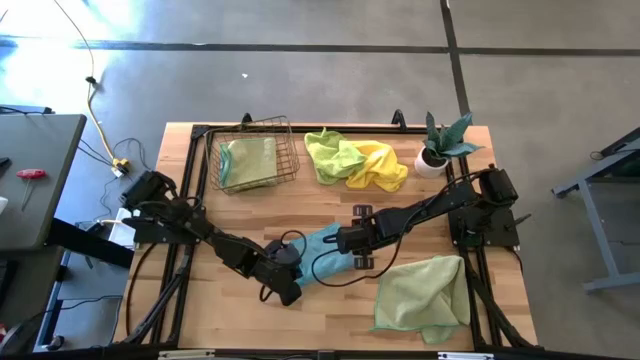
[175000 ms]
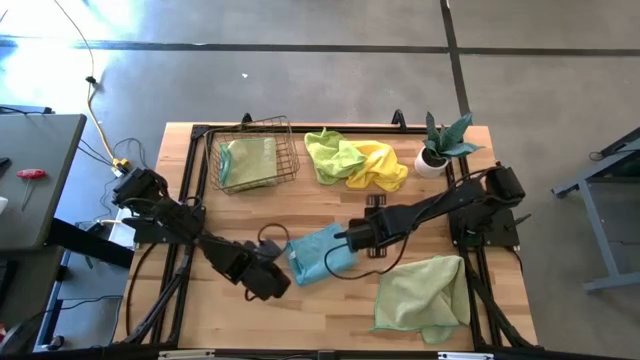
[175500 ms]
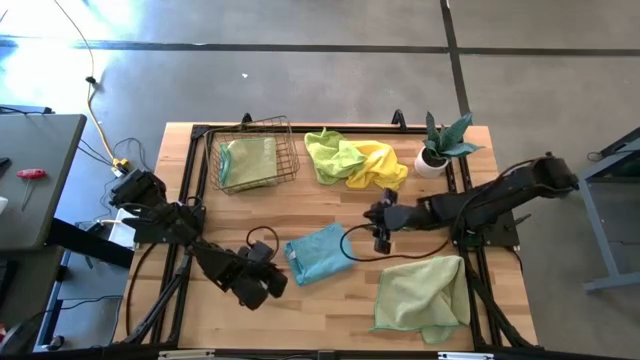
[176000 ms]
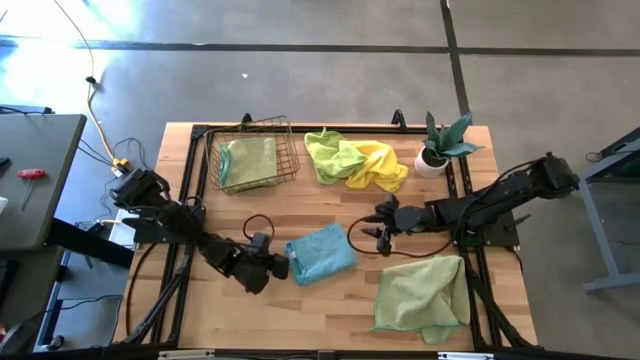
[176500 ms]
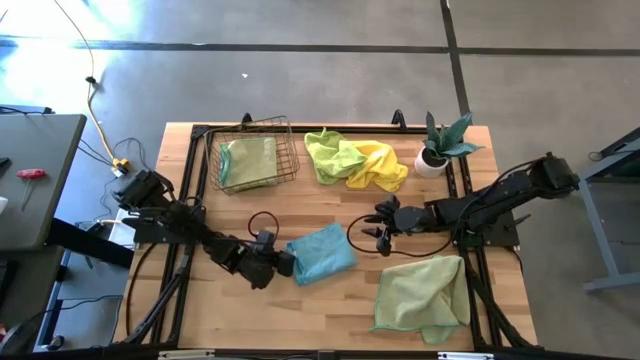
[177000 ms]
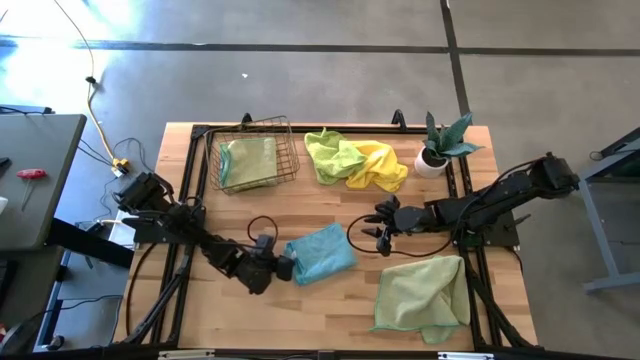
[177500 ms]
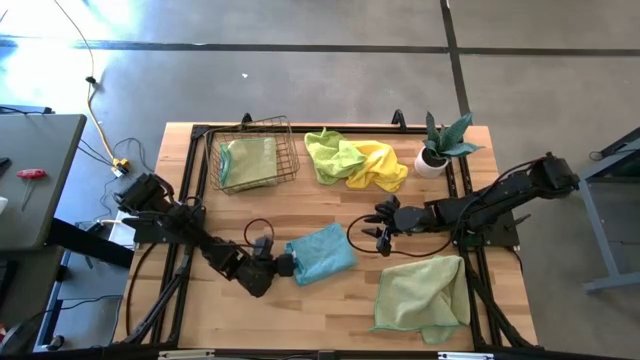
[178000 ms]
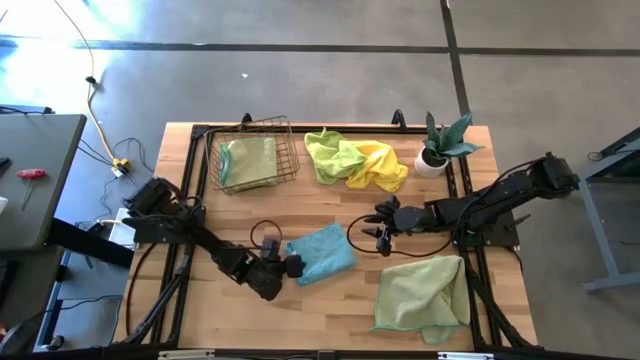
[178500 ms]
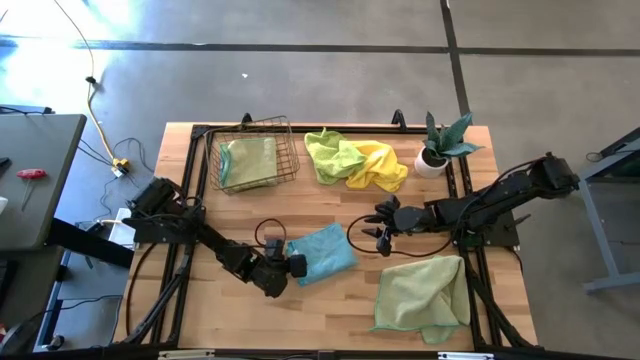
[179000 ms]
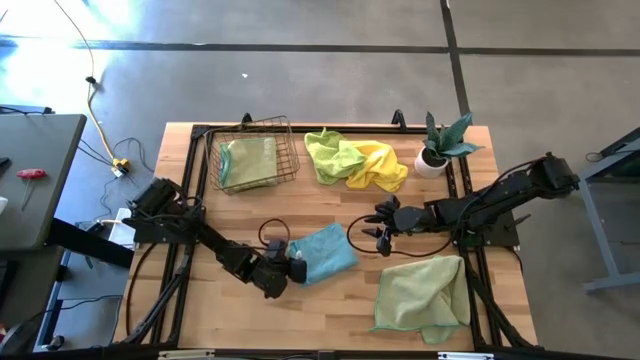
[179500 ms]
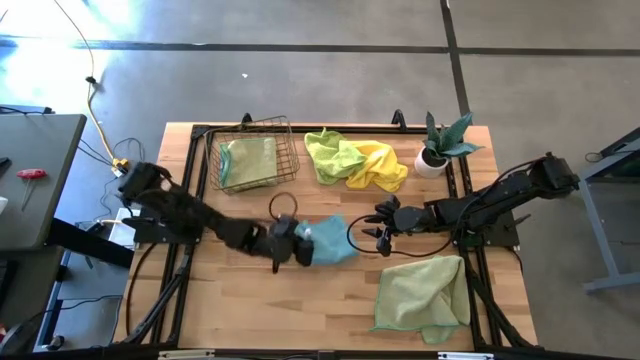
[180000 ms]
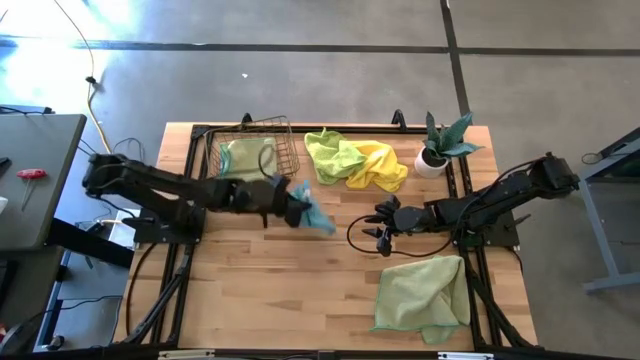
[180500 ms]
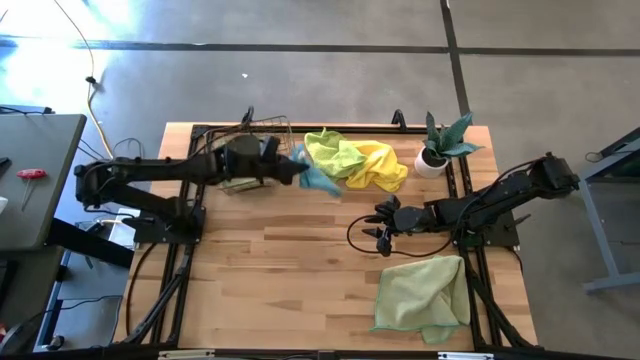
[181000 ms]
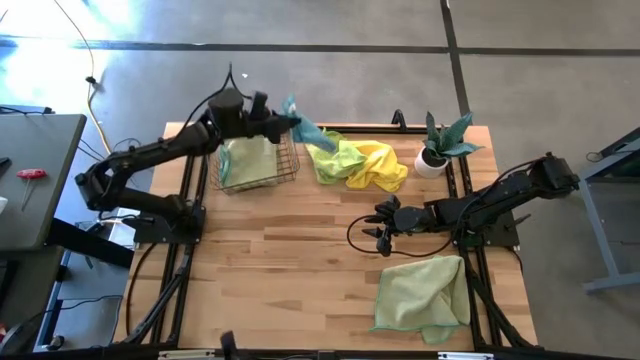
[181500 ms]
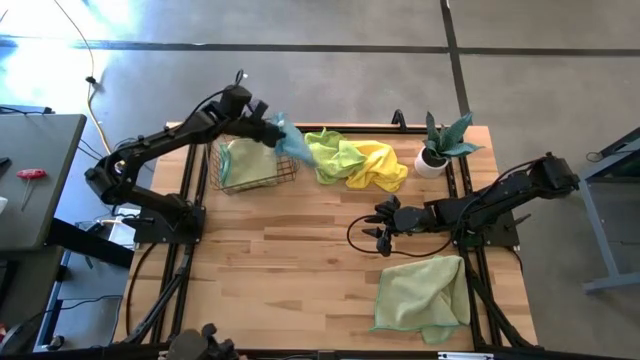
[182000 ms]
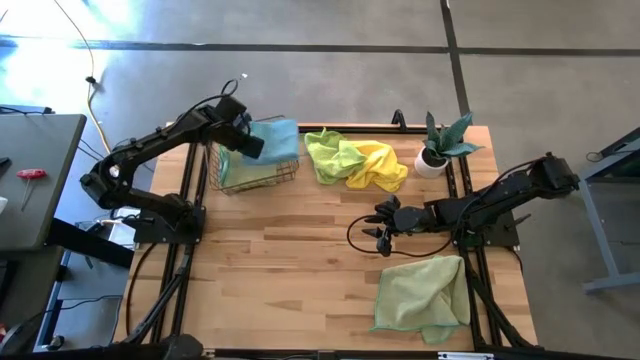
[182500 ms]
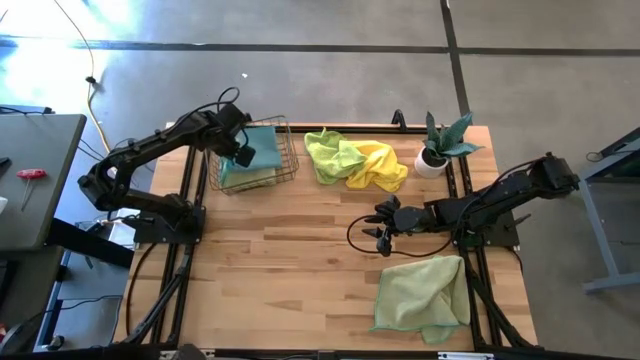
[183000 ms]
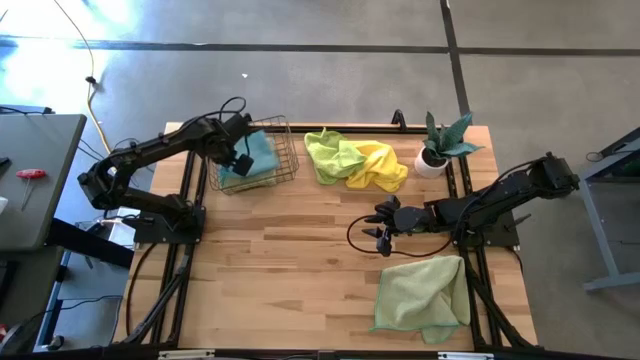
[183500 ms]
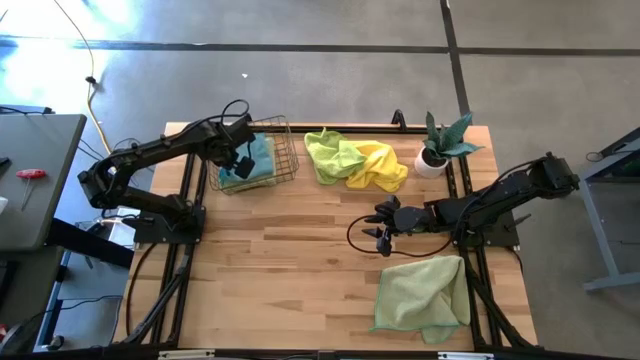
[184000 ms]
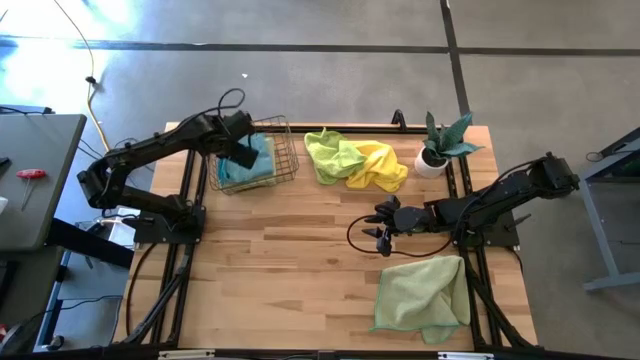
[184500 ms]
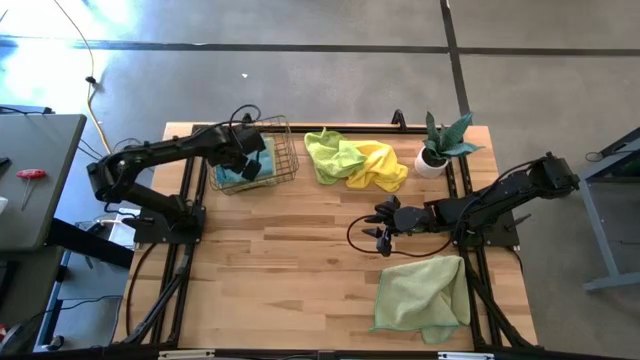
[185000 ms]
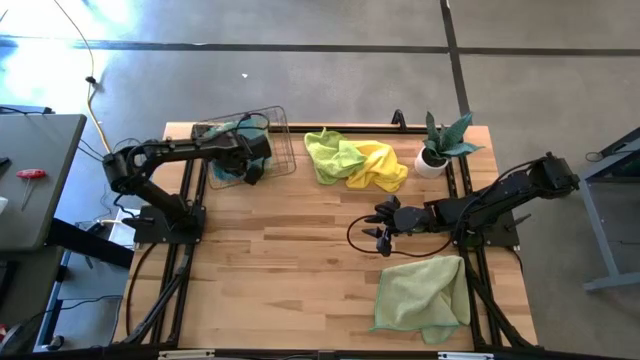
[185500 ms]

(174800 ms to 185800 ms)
Task: Fold microfiber towels
Put the folded blue towel into the wire basket

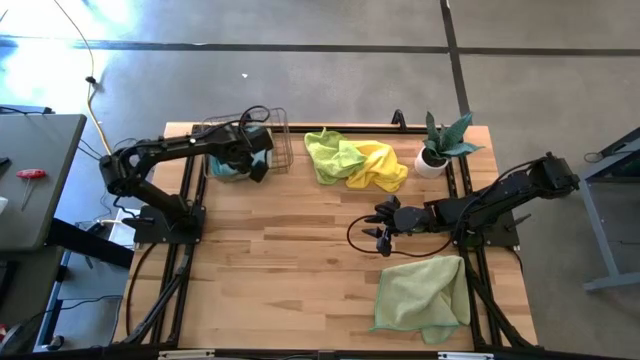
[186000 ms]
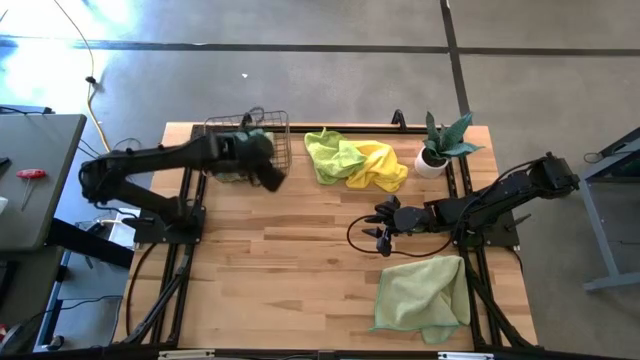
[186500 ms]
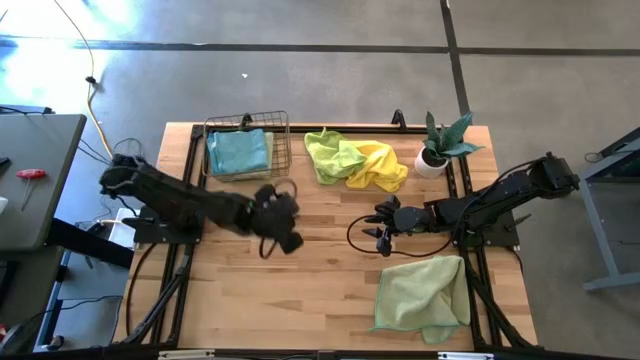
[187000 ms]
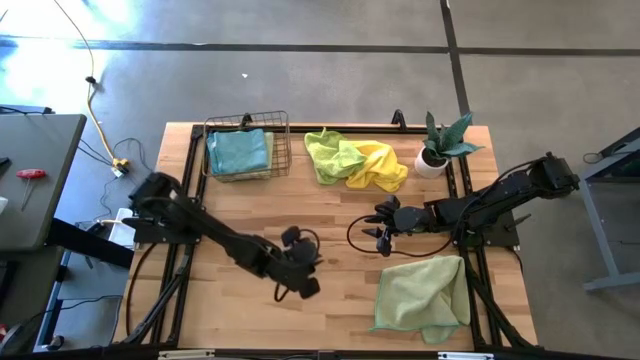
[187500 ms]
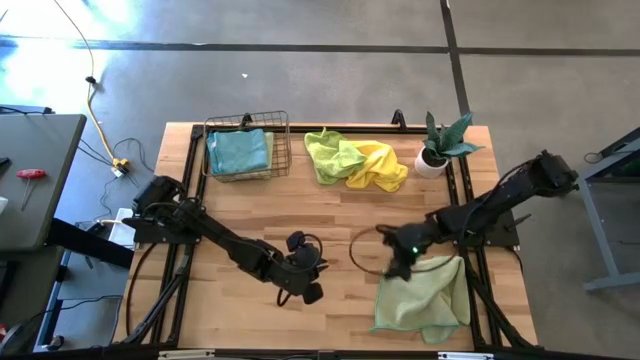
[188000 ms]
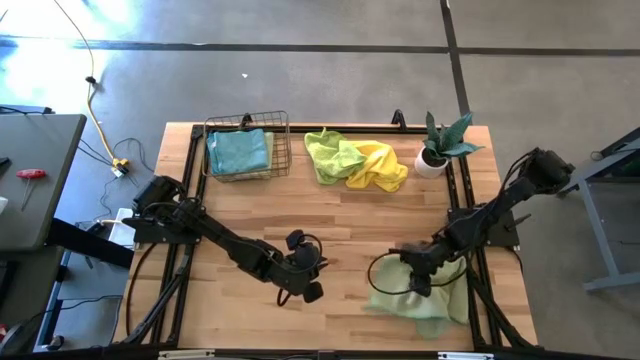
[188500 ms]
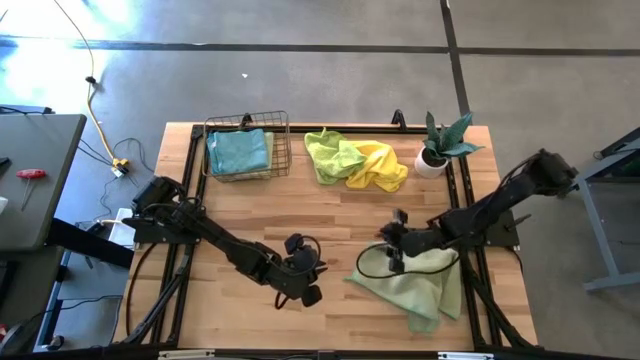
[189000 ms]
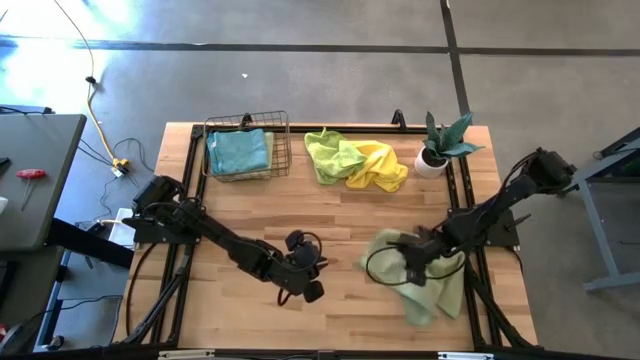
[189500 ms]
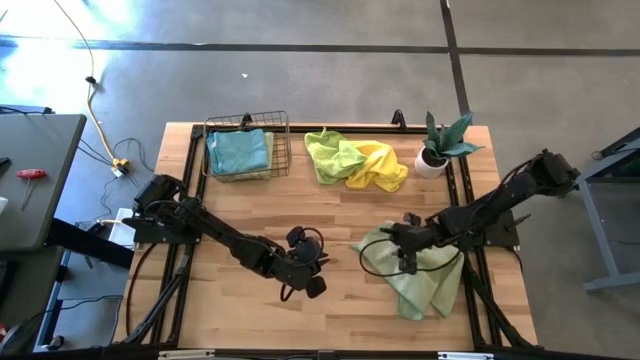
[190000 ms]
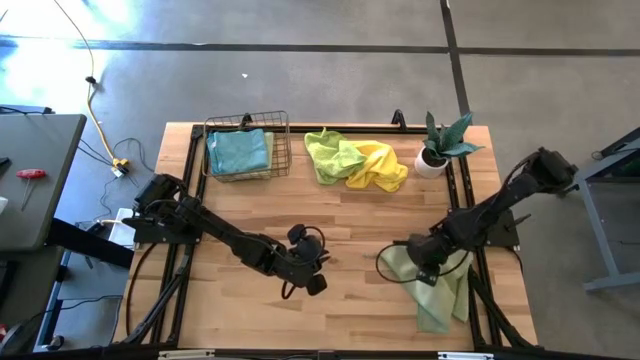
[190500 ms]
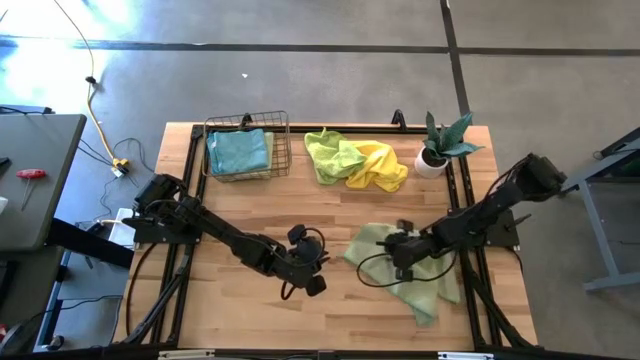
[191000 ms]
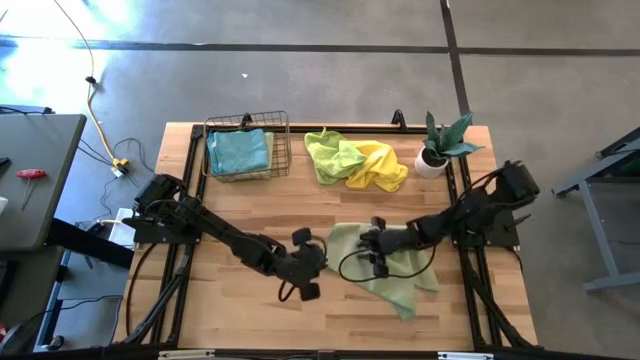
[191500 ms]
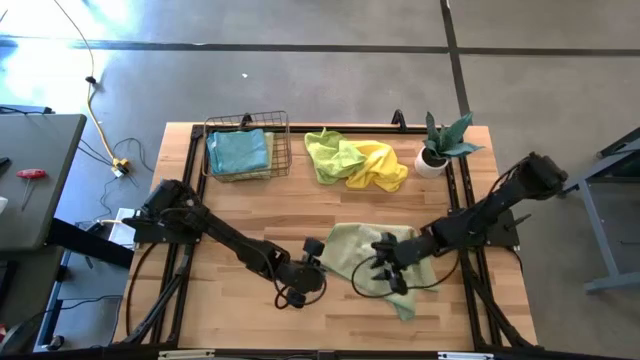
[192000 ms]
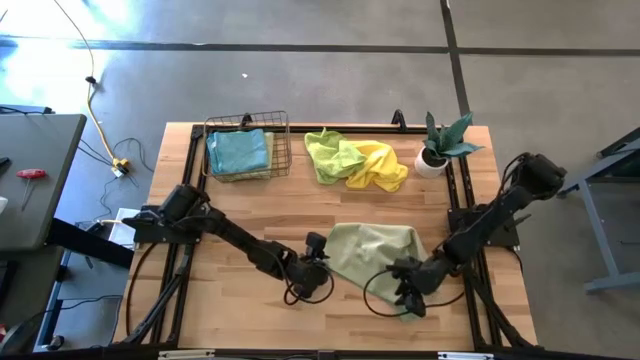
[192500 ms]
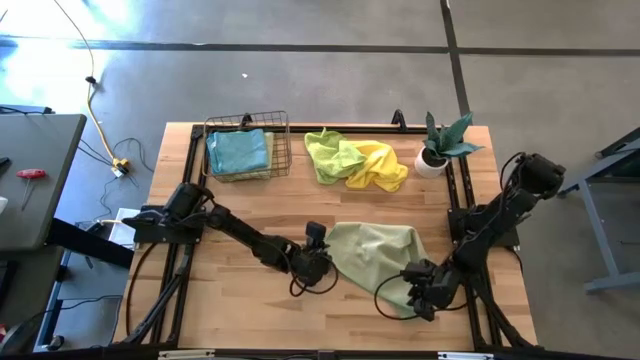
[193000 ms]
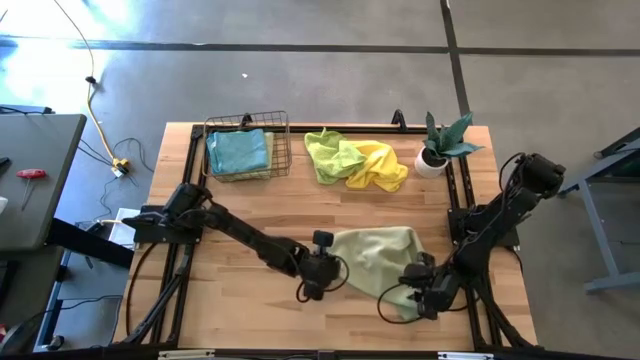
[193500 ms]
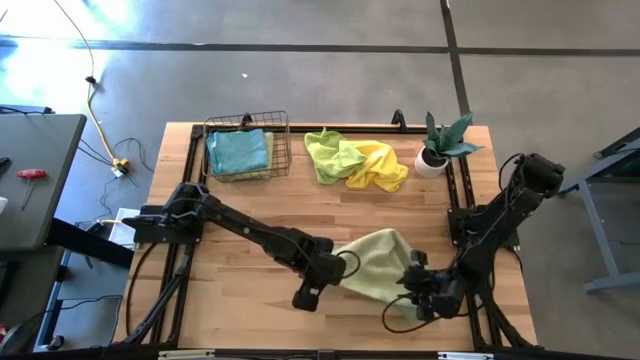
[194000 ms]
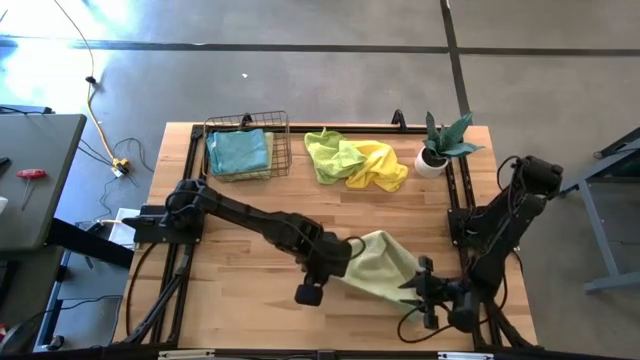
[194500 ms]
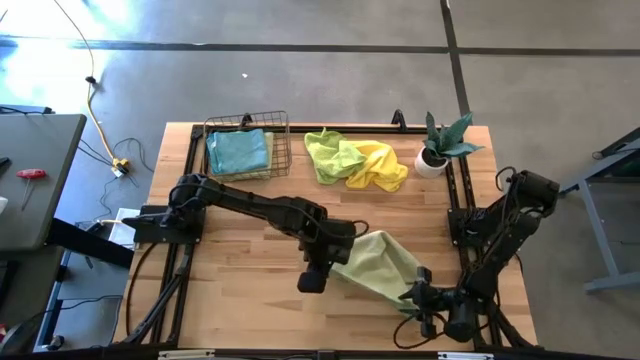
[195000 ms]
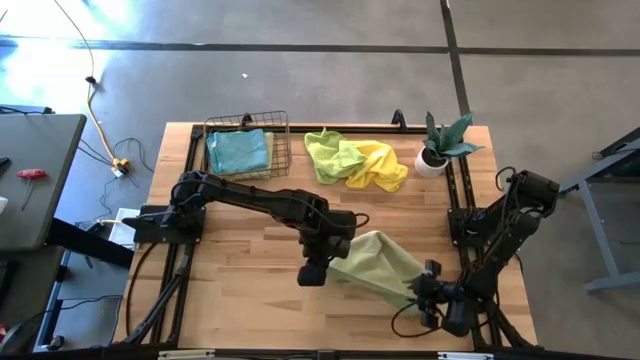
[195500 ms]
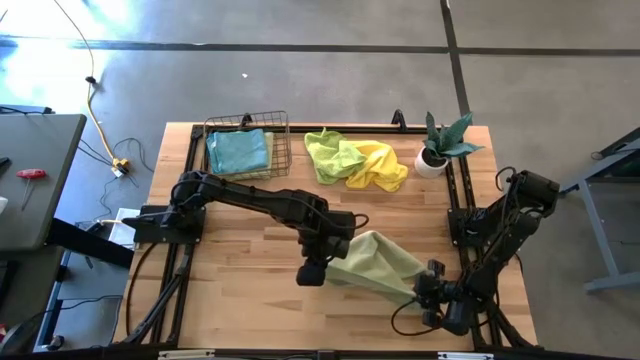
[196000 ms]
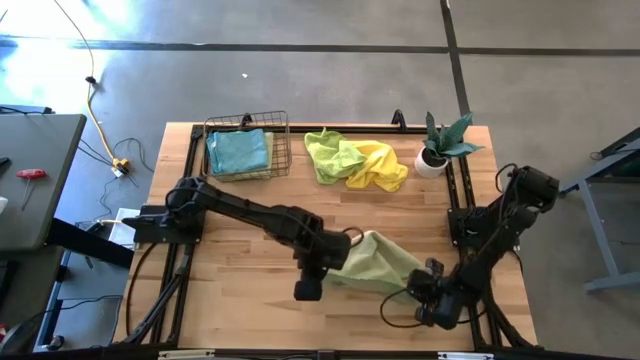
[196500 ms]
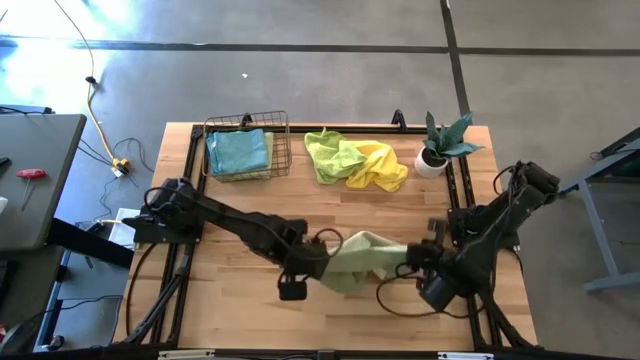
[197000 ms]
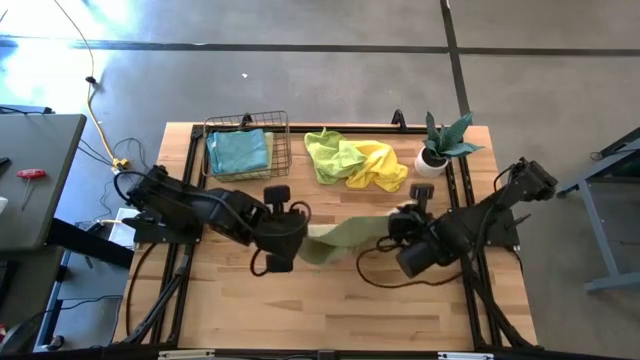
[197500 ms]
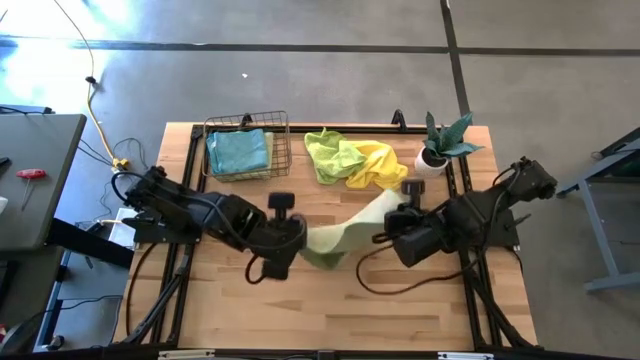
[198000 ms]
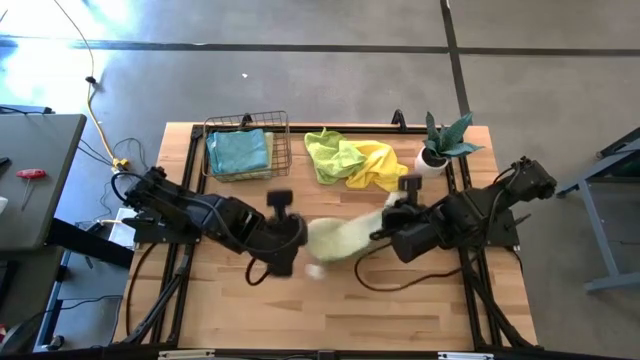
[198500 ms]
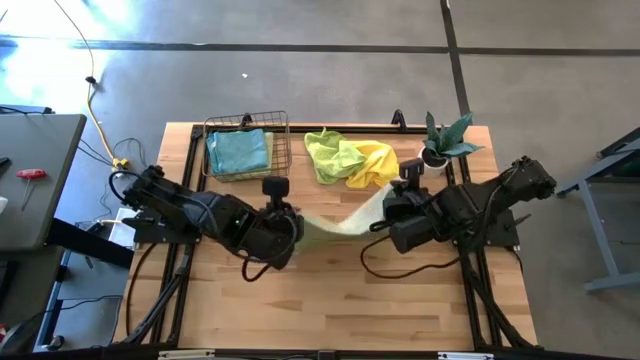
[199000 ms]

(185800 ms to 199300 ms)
Fold the green towel
